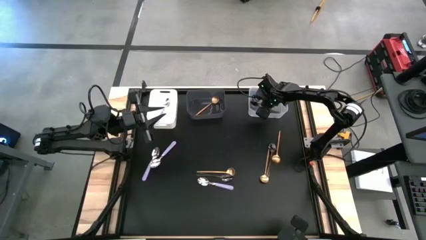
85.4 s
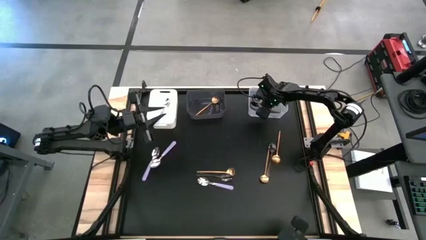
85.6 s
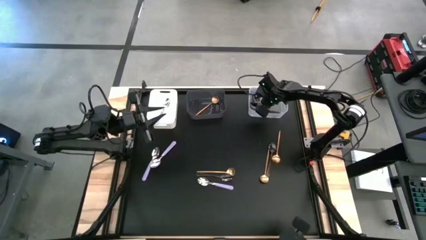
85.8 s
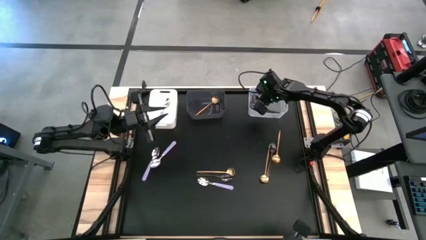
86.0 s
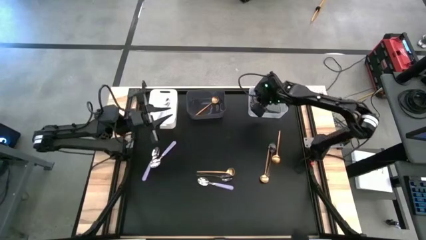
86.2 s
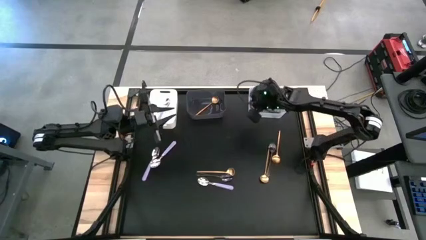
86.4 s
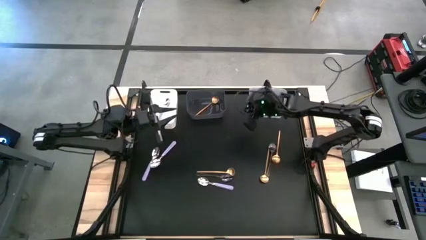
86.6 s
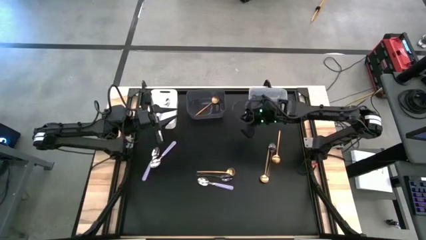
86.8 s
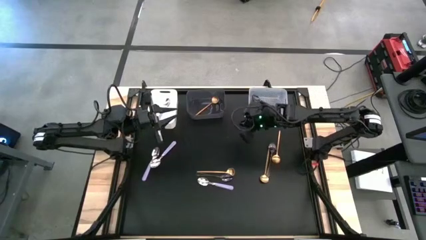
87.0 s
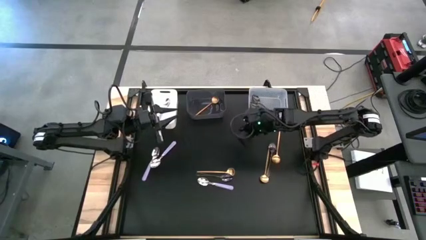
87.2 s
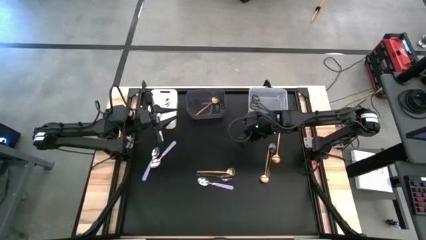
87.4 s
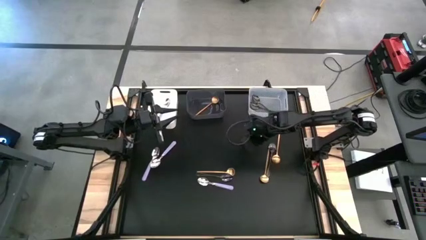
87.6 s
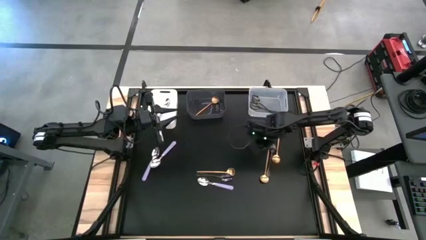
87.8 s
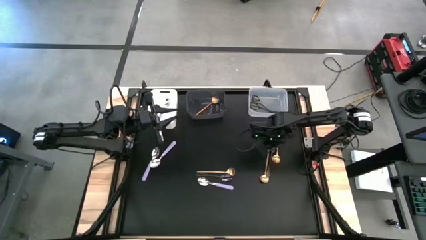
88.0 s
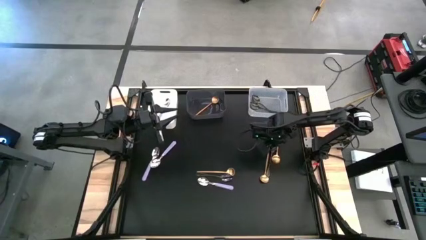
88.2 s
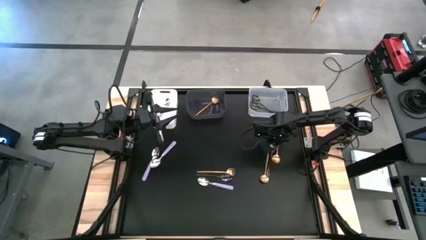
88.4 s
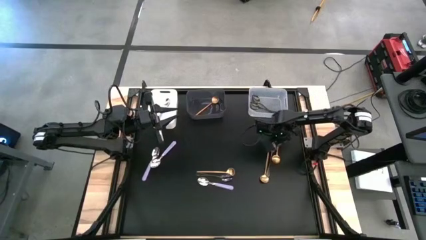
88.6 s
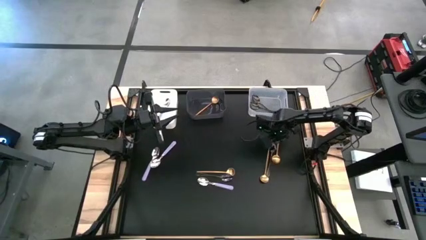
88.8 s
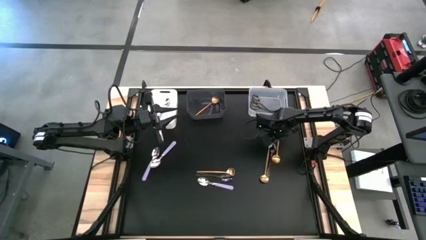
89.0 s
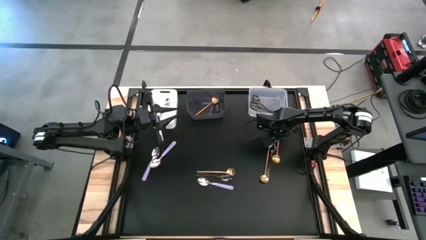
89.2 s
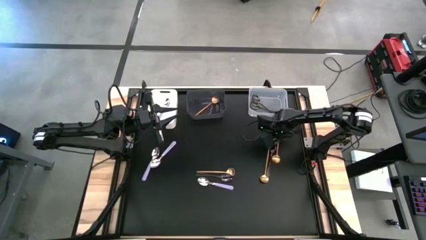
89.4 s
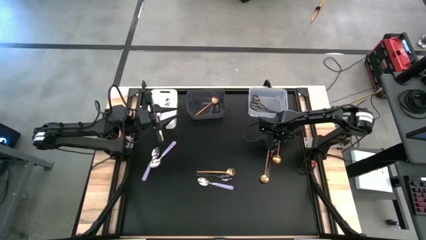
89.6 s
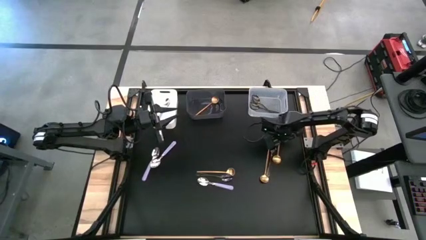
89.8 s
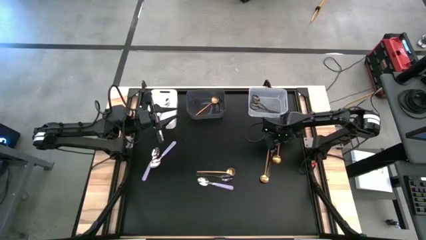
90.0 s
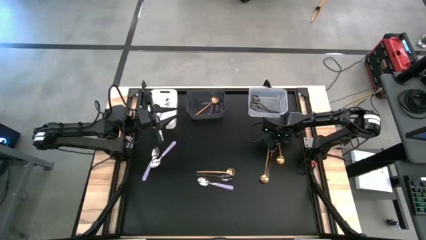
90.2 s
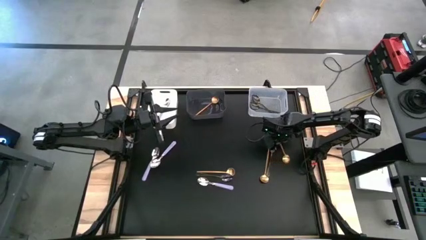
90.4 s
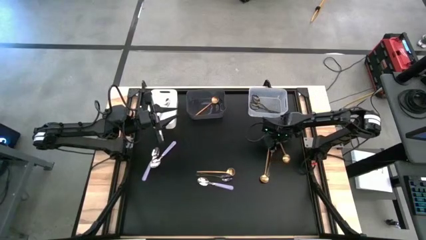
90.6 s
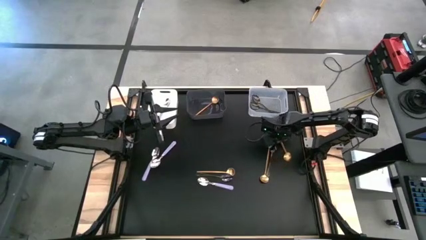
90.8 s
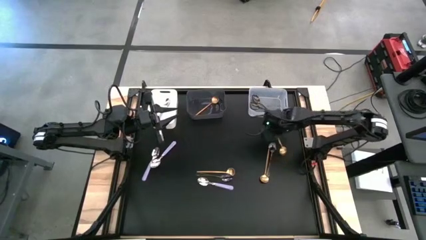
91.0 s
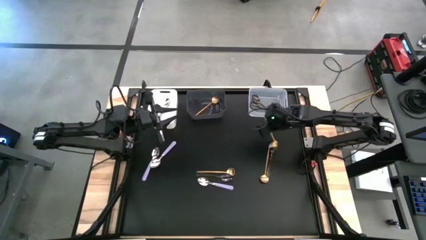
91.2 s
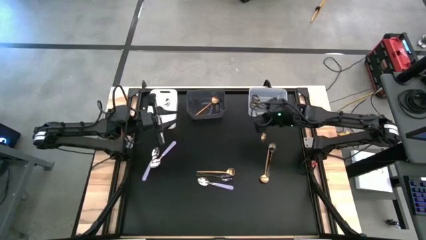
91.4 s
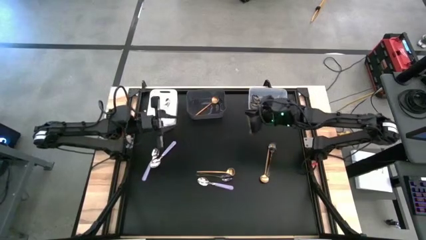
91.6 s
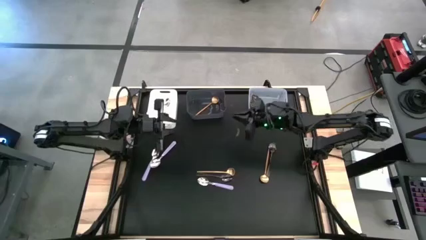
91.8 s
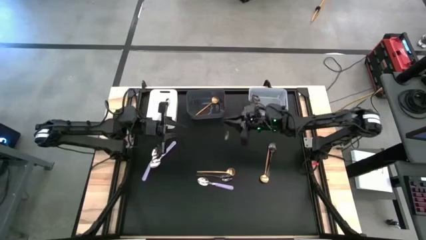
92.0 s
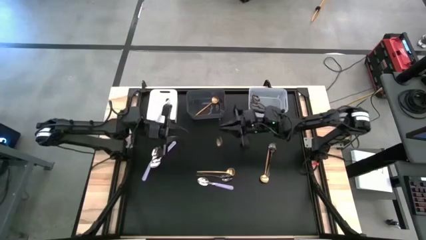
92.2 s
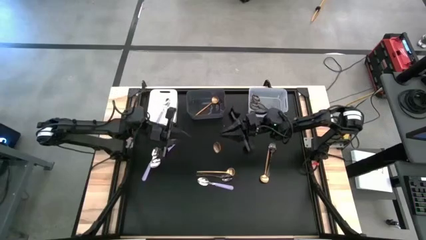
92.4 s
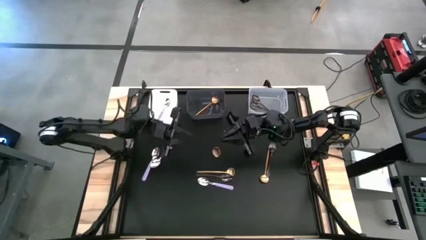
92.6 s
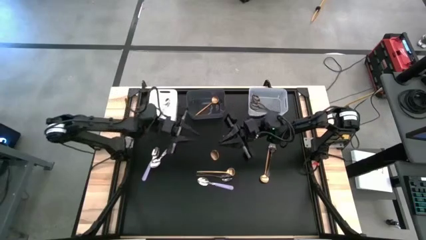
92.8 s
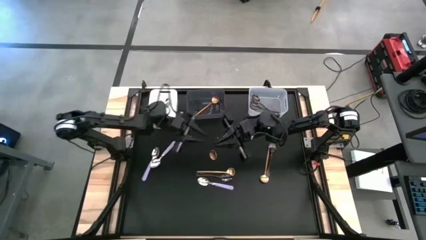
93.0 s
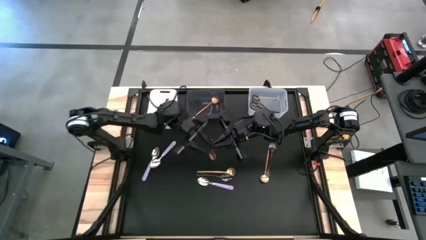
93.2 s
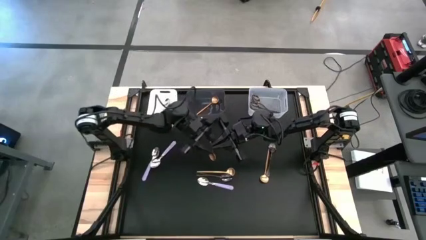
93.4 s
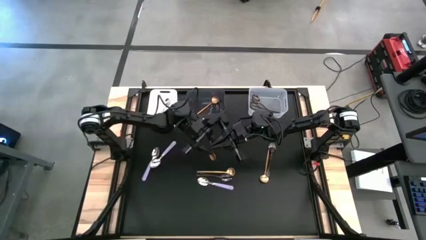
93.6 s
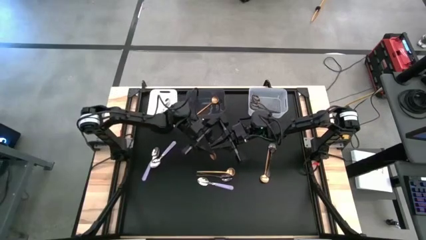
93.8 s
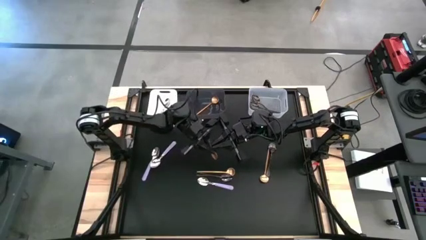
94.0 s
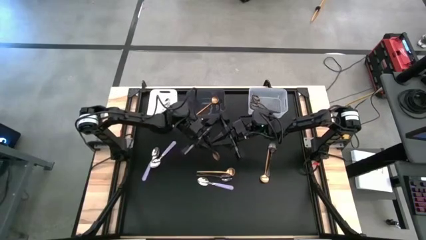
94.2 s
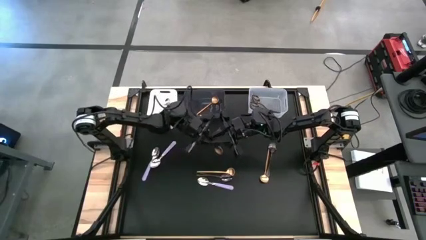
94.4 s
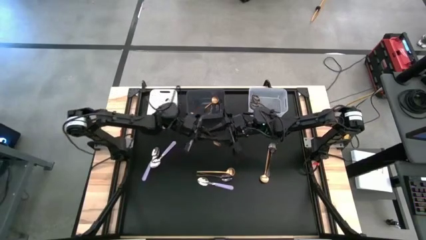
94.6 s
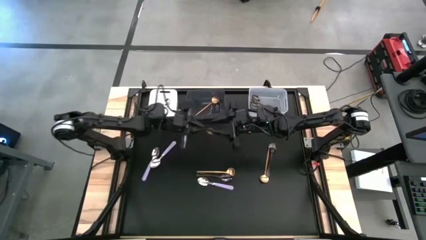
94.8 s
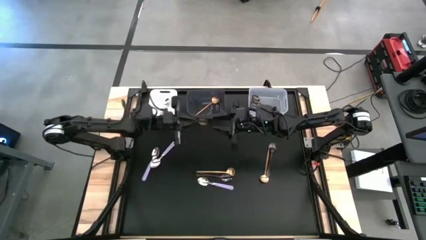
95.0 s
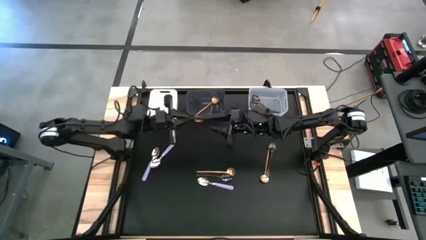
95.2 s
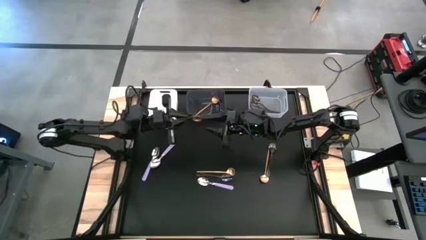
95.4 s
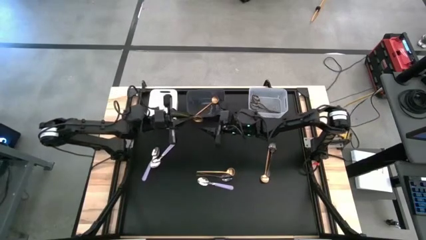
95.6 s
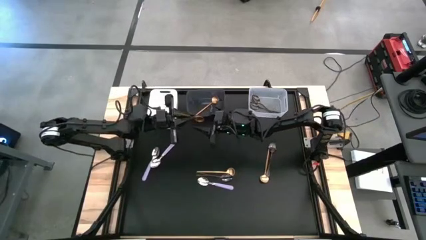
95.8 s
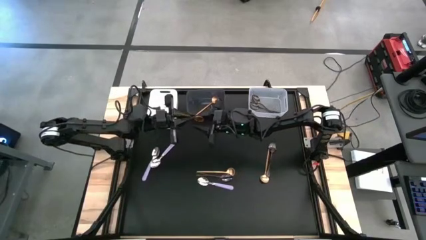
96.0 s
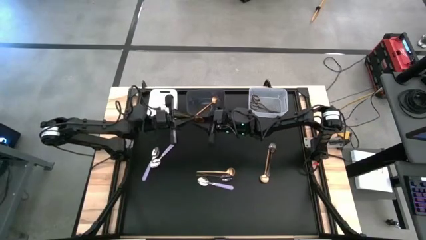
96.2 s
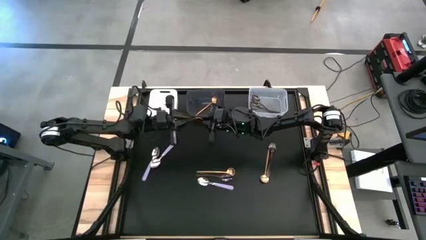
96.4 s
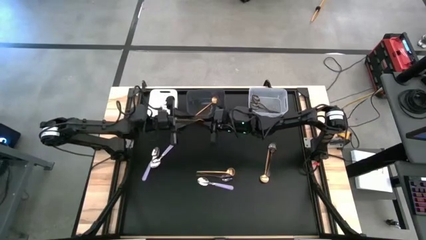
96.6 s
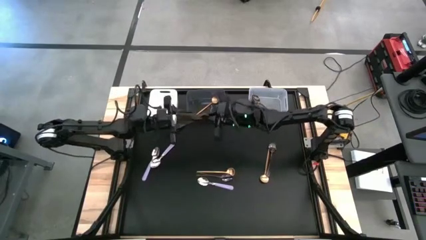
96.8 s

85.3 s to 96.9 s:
Task: Sort silverware by color (type)
Put the gold spoon into the black bin
